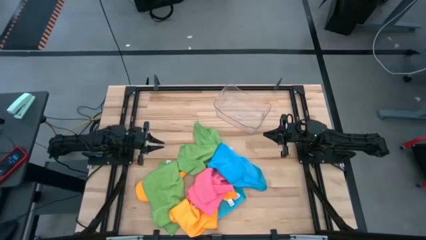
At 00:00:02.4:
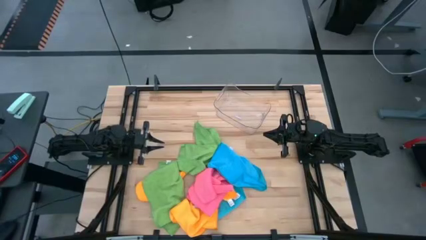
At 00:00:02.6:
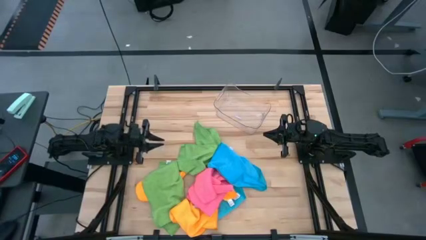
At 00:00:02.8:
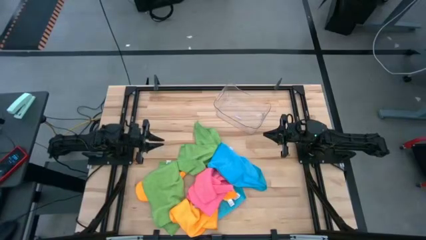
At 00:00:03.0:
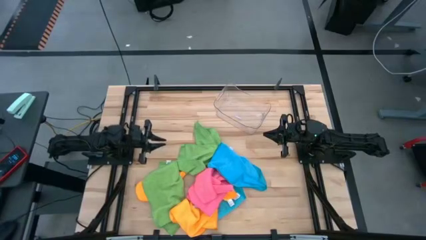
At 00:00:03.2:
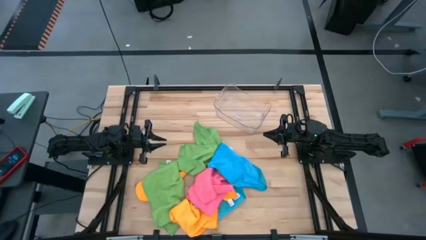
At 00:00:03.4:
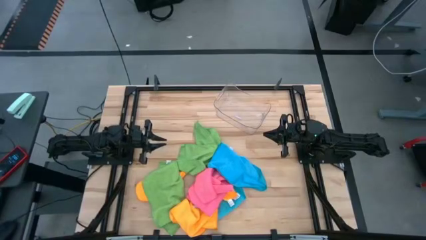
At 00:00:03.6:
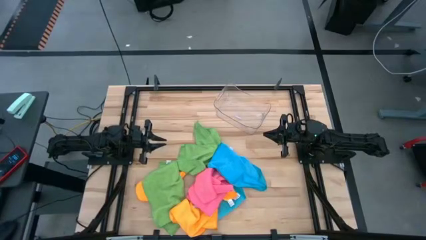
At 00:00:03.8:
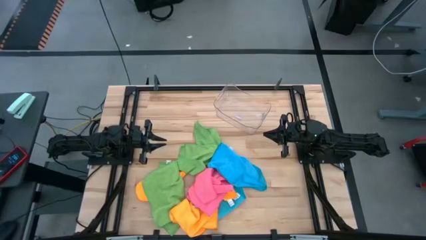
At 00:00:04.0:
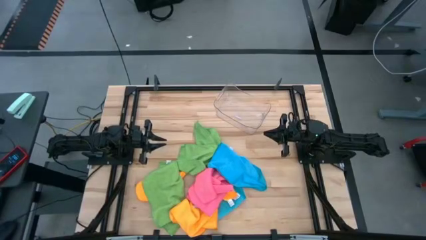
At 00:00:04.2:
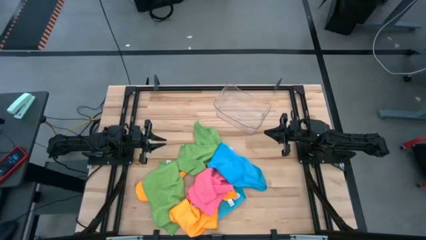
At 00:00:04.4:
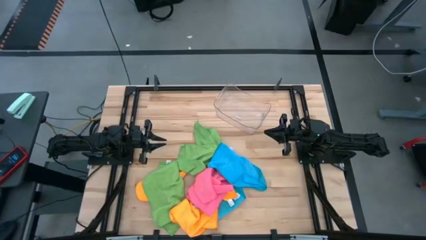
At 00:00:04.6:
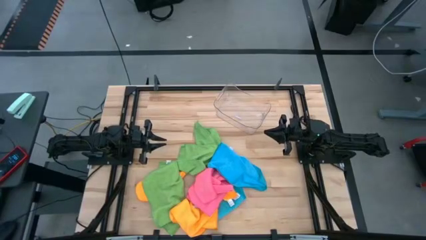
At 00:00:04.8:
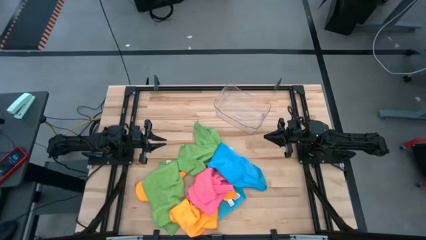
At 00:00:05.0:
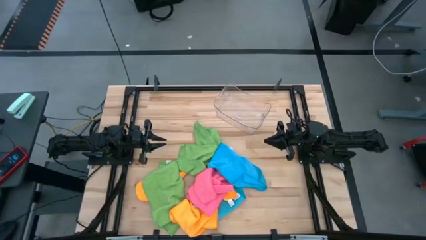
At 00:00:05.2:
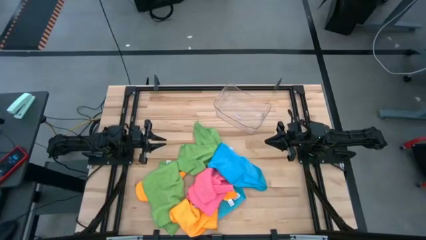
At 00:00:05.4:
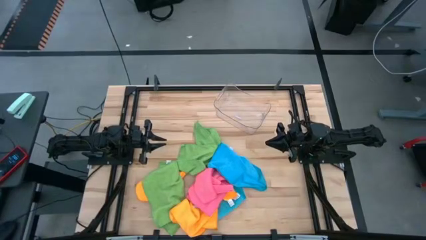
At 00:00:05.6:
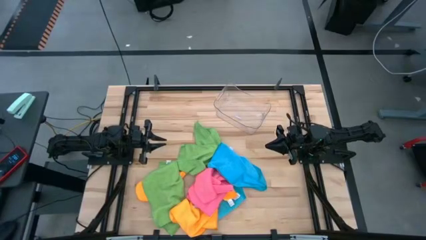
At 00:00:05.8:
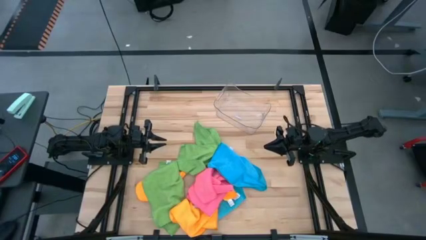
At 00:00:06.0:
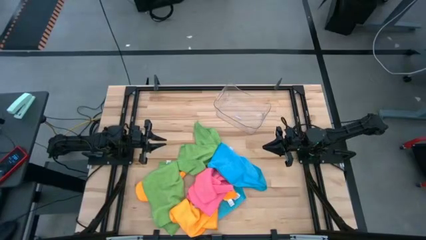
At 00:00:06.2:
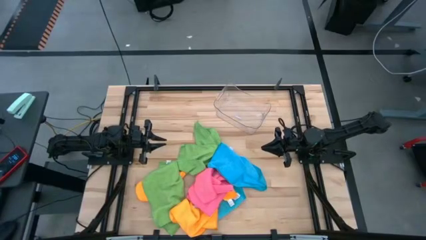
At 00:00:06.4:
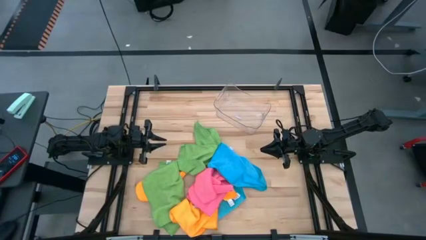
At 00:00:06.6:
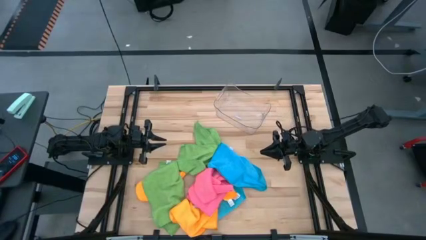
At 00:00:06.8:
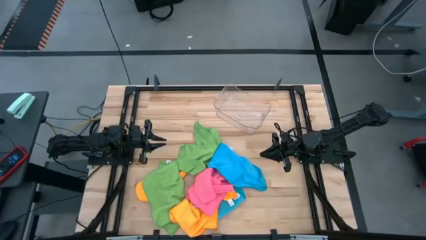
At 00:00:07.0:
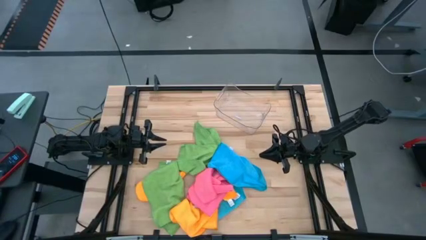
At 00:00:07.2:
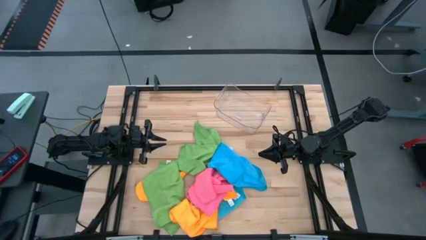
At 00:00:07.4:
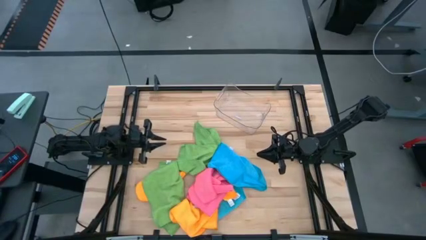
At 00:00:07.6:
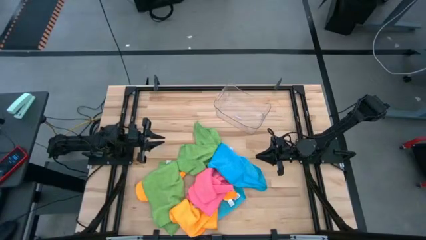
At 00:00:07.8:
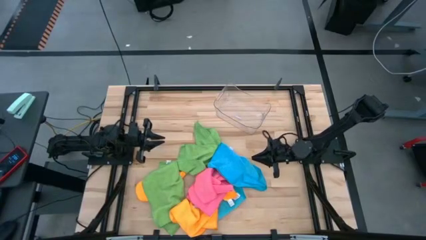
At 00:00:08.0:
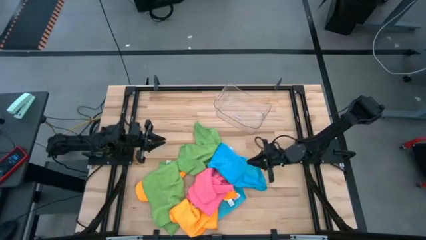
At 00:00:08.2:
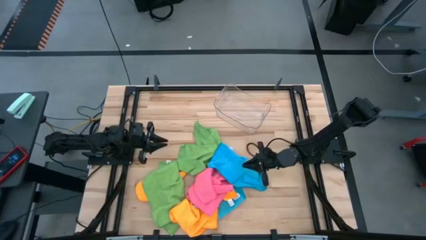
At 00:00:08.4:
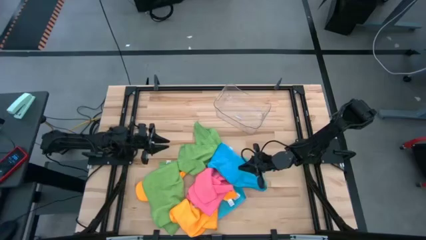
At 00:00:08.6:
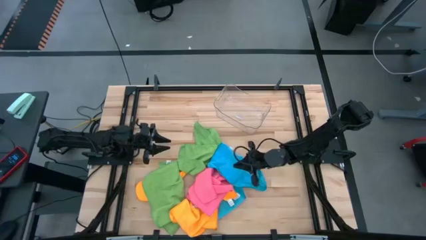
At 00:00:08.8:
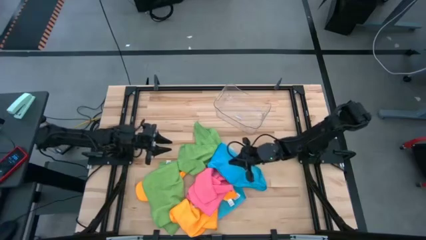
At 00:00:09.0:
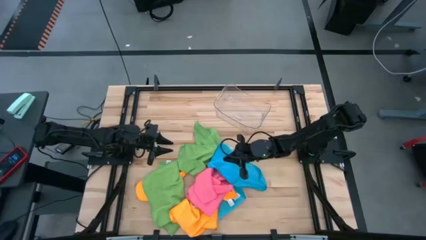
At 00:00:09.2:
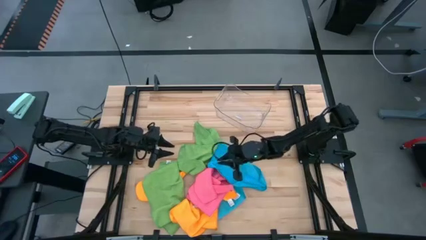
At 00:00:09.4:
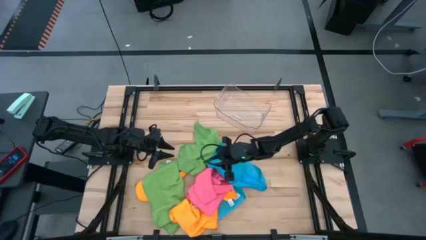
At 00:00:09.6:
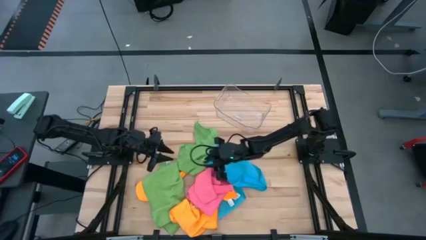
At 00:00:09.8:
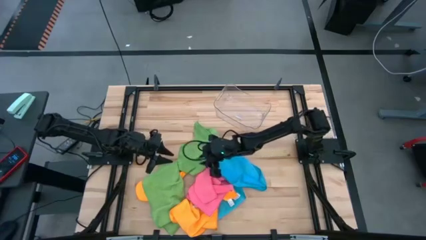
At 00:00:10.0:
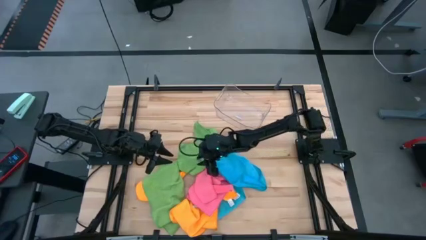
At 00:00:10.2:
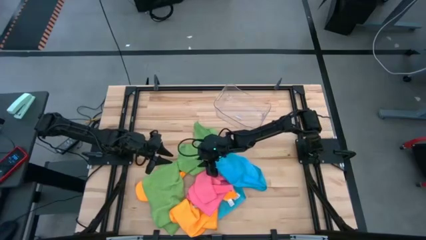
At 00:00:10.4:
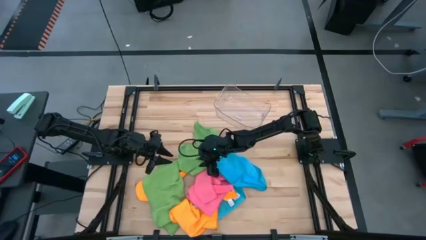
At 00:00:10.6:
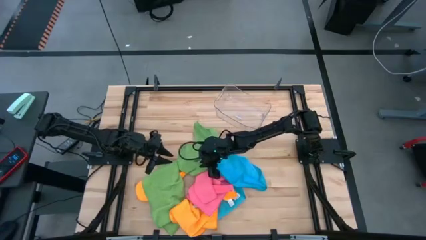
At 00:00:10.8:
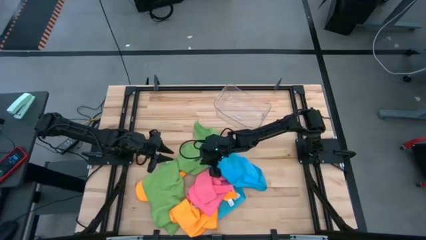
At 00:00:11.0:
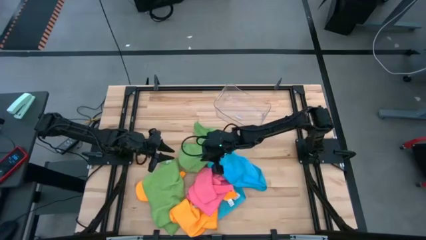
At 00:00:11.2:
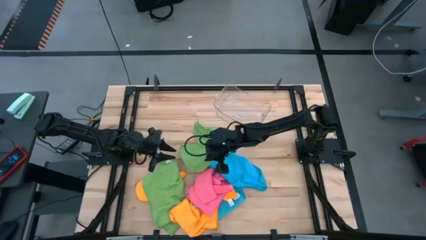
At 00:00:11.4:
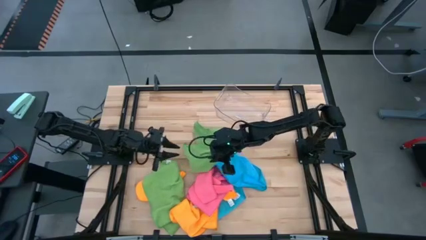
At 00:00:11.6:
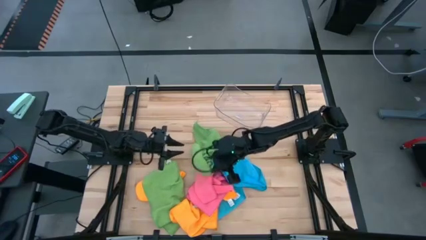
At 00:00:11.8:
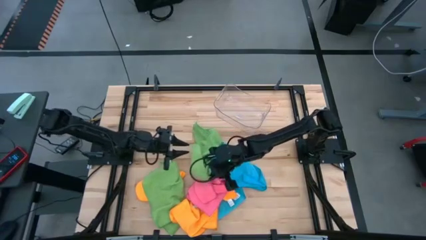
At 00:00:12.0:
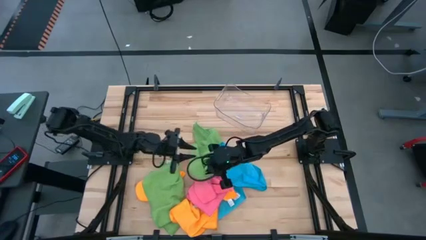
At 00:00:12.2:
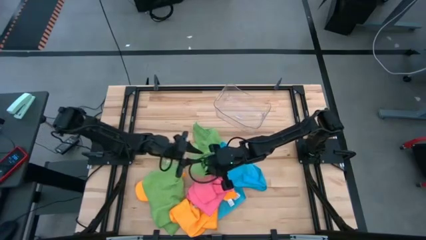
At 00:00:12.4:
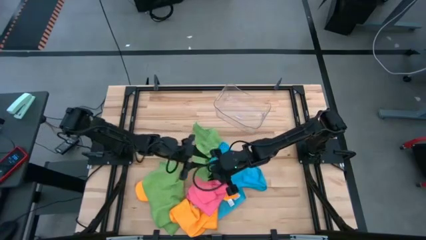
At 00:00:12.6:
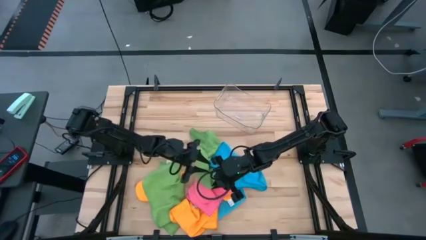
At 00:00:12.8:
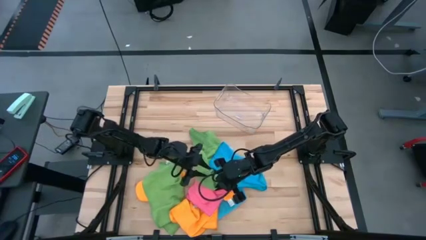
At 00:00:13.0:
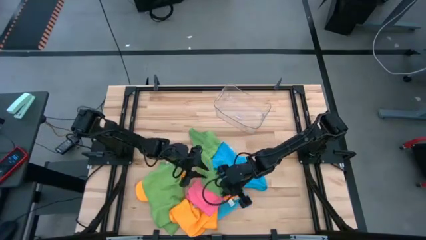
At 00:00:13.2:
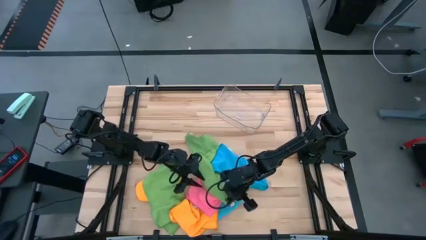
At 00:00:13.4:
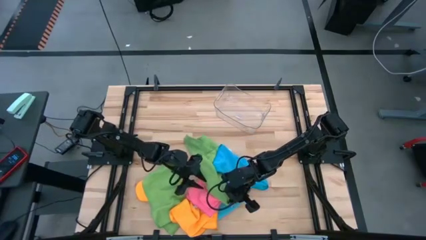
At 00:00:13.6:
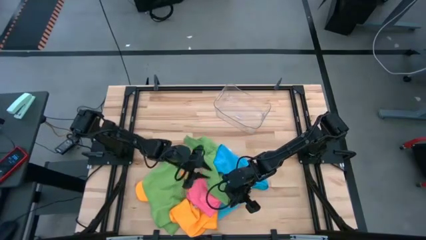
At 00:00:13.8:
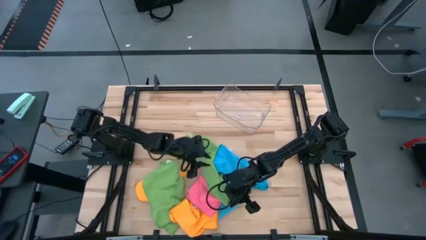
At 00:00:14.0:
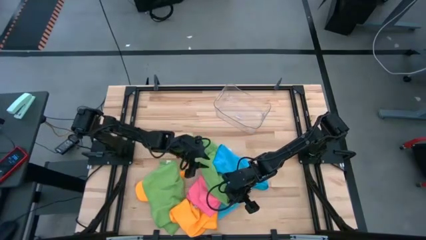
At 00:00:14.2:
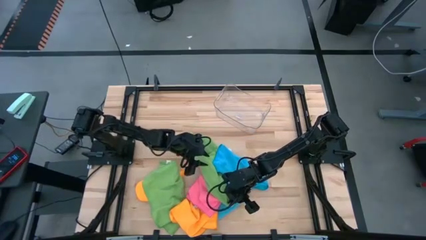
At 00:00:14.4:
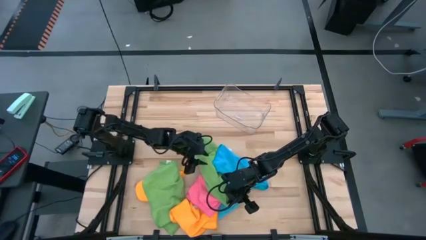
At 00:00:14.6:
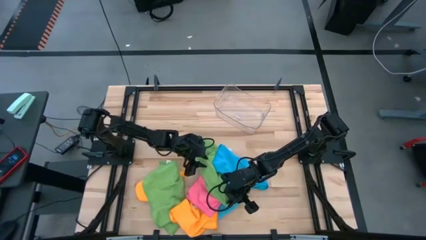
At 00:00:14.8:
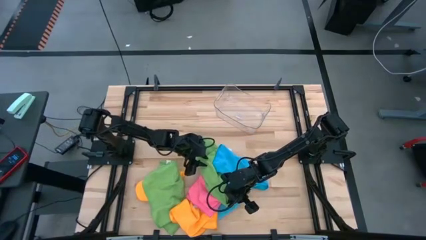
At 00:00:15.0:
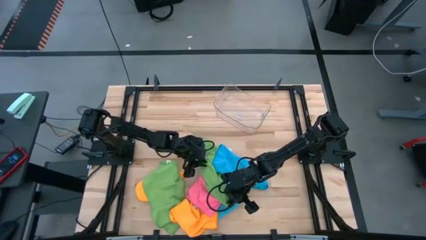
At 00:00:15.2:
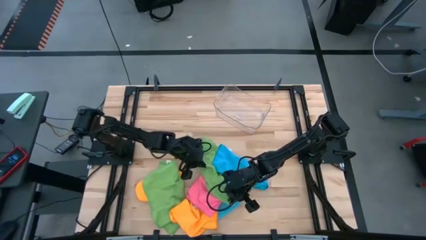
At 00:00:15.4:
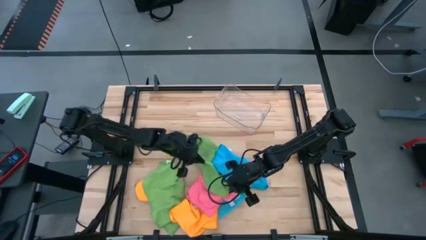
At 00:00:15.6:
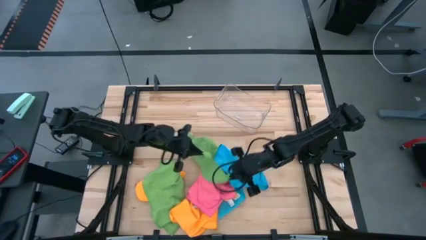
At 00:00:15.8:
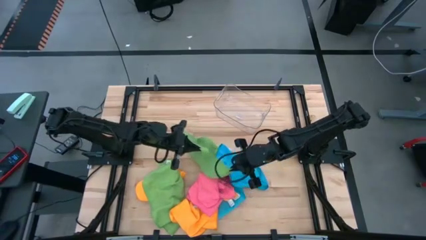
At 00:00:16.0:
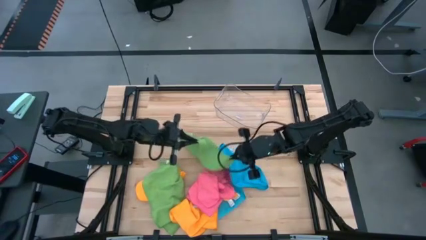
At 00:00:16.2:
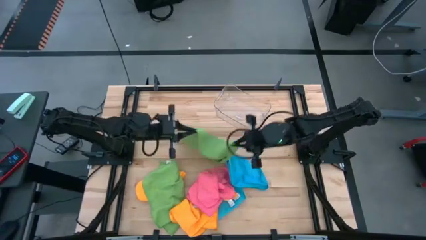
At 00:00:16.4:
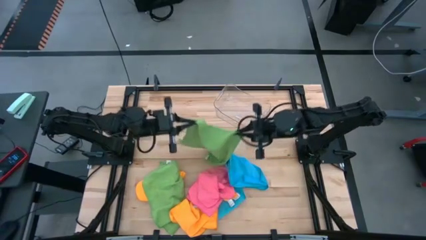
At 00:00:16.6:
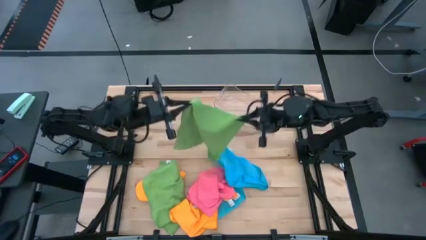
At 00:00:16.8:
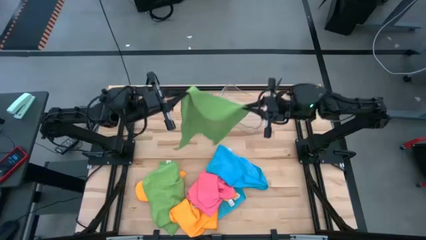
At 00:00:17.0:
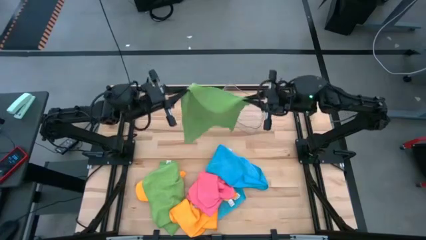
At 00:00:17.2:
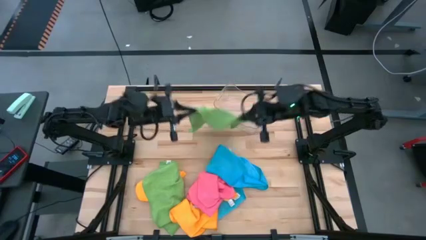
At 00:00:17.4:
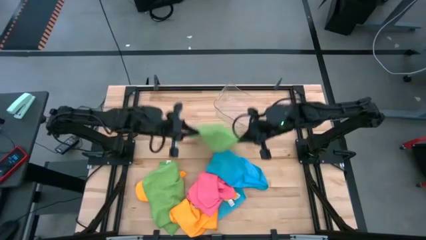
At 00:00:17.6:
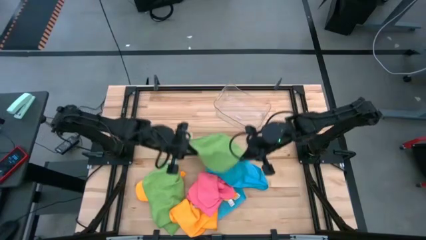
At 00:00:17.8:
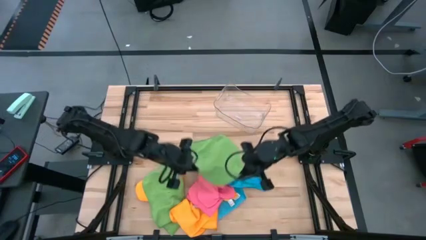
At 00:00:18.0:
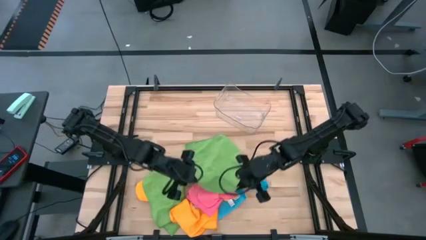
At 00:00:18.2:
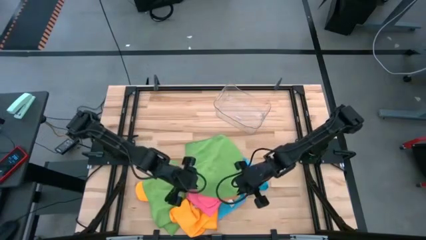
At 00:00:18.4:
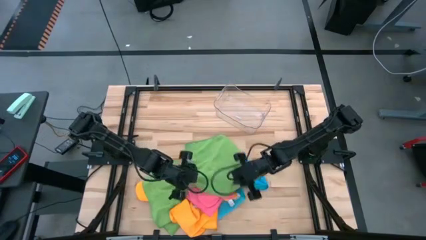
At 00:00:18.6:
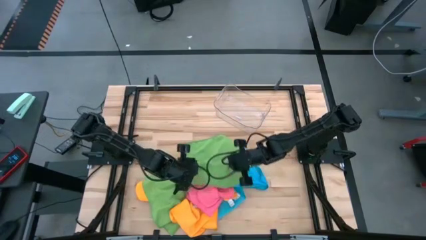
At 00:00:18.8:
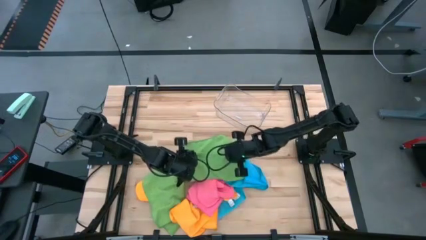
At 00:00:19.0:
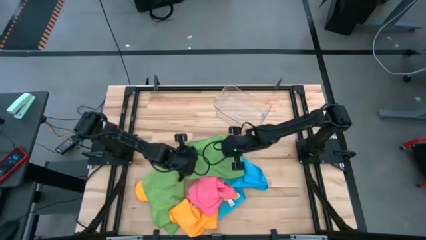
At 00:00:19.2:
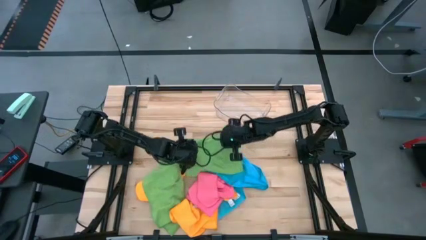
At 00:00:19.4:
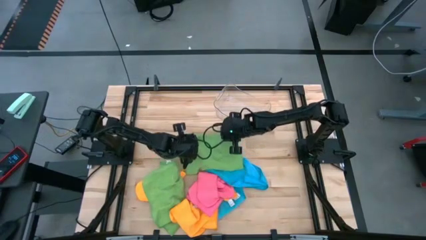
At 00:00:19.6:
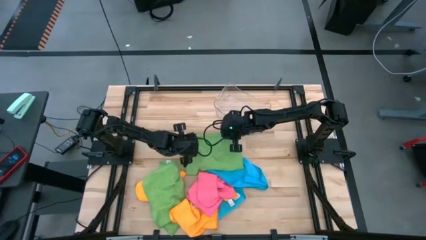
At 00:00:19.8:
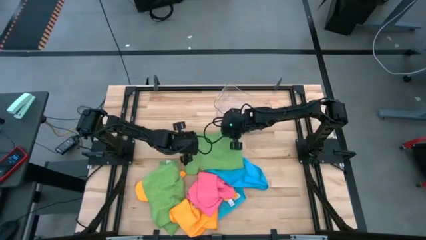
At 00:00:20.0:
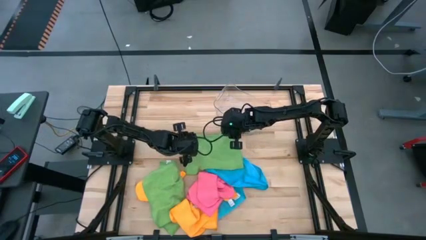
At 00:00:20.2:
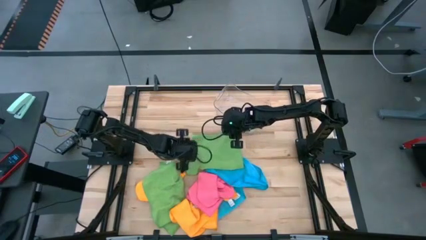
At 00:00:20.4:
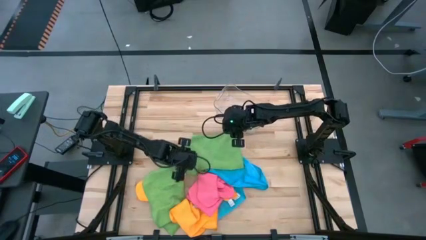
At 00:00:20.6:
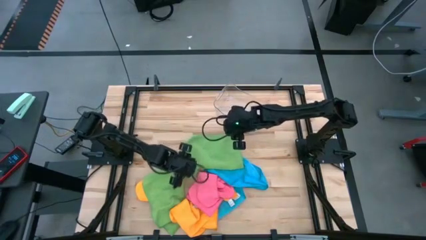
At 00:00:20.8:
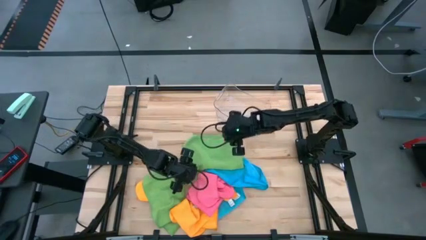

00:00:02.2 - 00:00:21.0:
Task: Fold microfiber towels
Fold the top green towel
